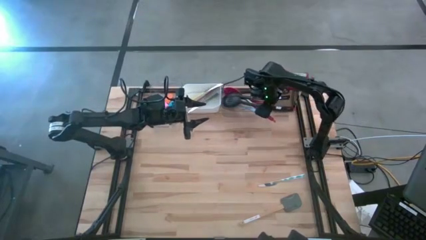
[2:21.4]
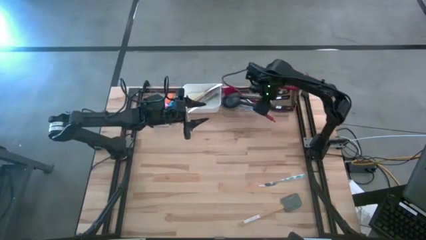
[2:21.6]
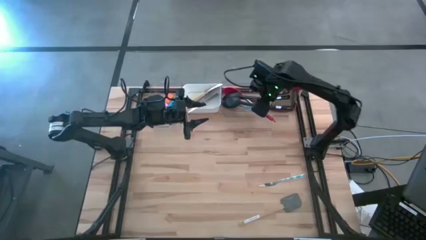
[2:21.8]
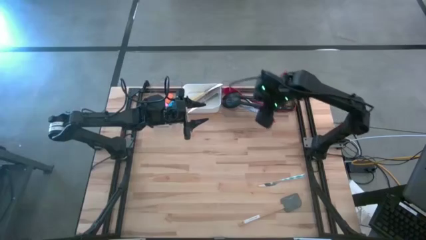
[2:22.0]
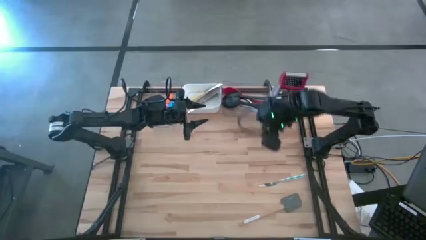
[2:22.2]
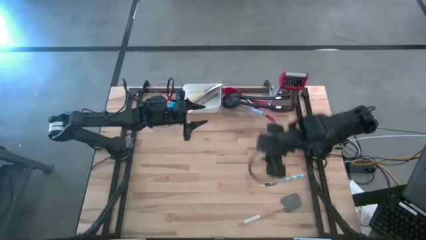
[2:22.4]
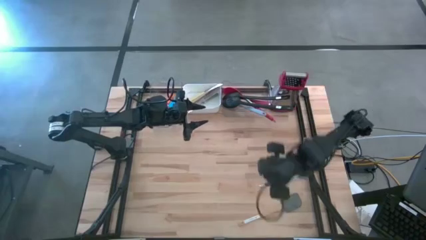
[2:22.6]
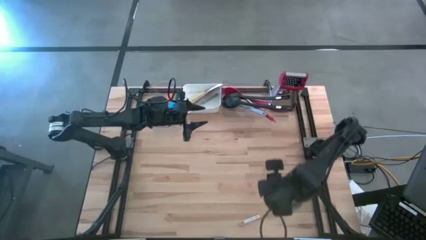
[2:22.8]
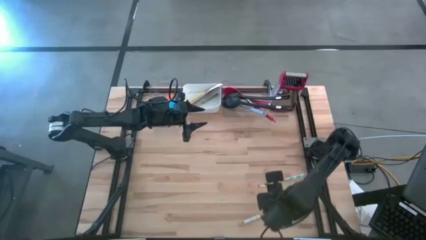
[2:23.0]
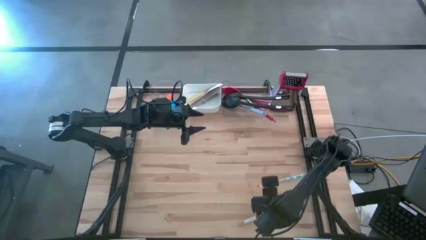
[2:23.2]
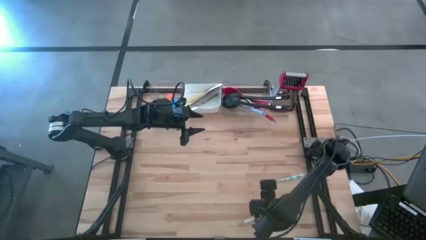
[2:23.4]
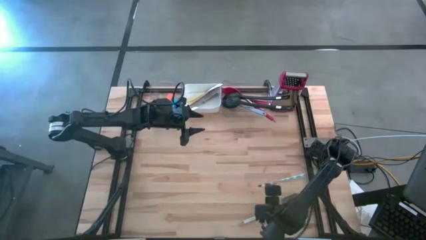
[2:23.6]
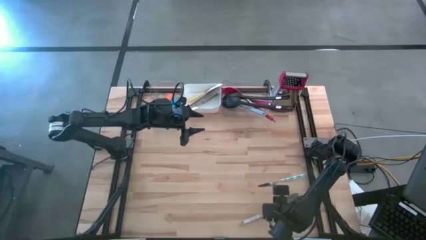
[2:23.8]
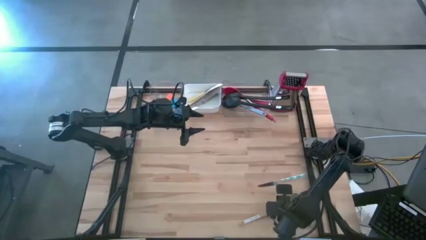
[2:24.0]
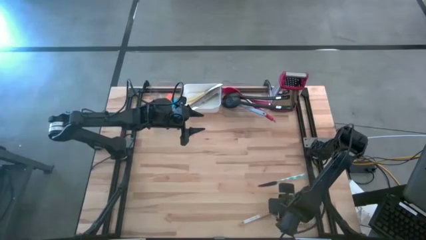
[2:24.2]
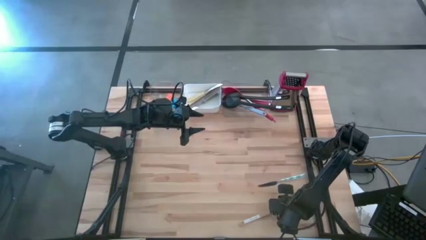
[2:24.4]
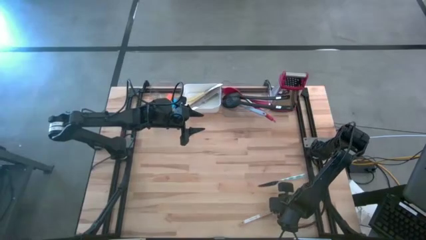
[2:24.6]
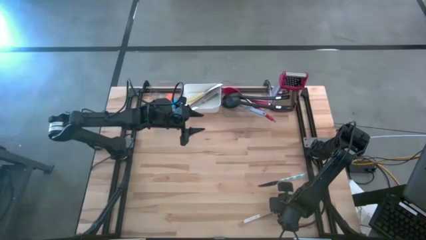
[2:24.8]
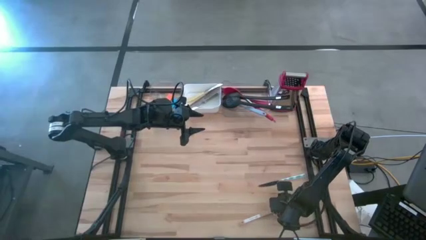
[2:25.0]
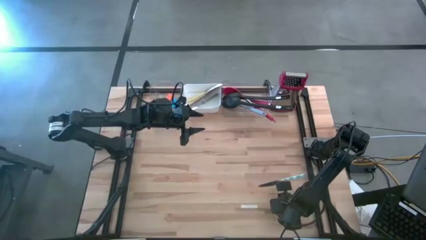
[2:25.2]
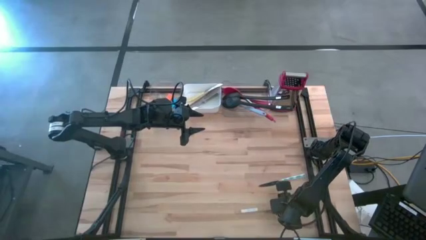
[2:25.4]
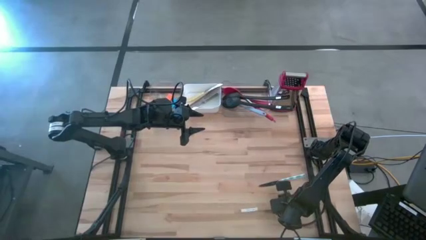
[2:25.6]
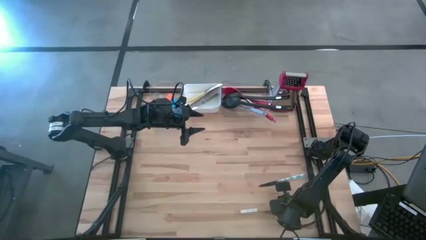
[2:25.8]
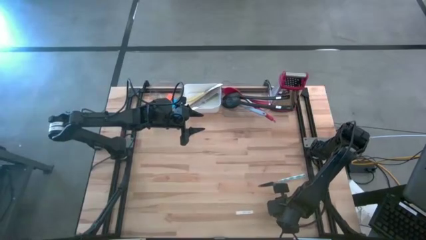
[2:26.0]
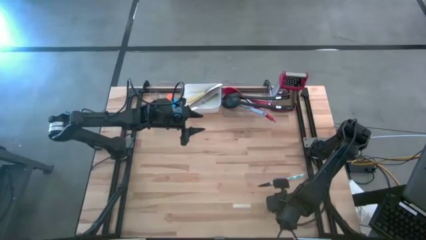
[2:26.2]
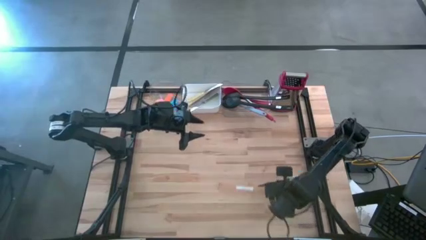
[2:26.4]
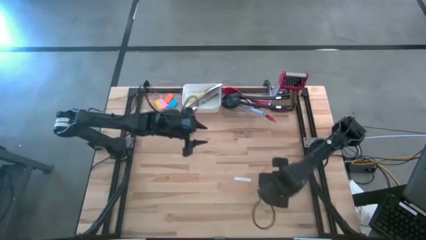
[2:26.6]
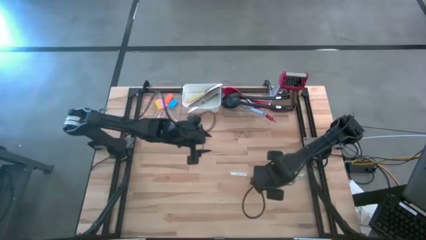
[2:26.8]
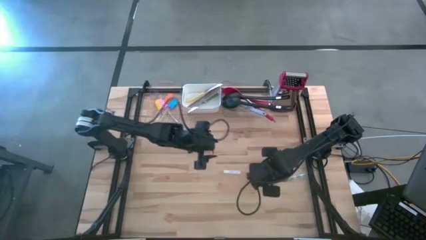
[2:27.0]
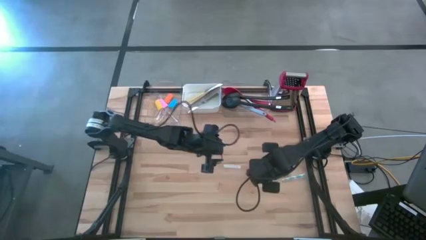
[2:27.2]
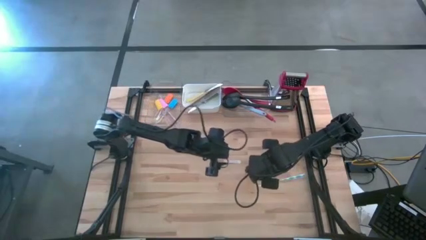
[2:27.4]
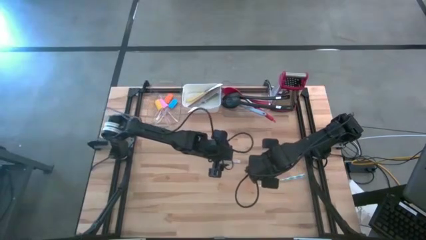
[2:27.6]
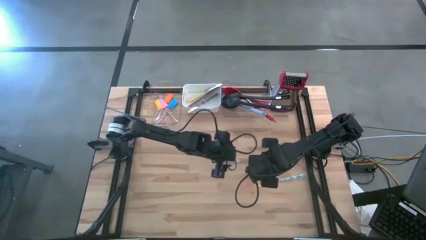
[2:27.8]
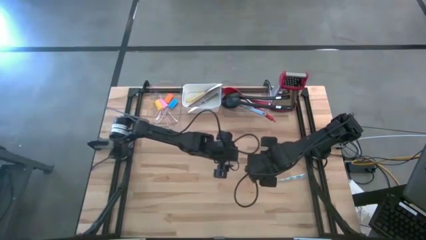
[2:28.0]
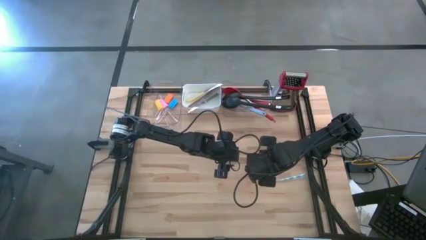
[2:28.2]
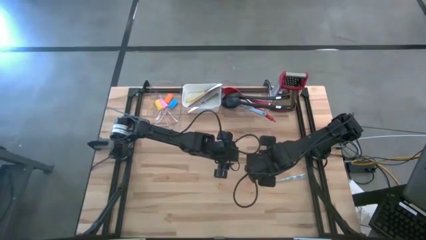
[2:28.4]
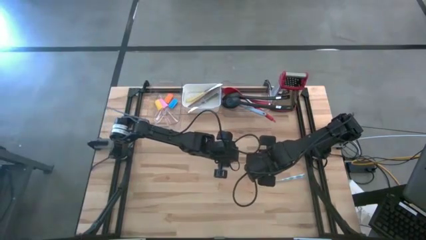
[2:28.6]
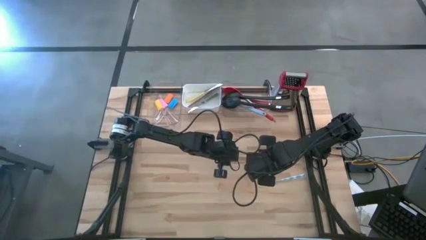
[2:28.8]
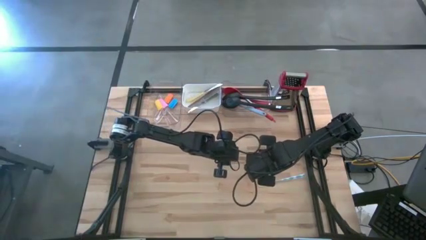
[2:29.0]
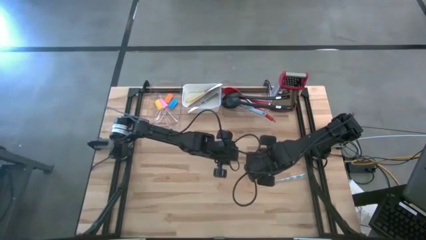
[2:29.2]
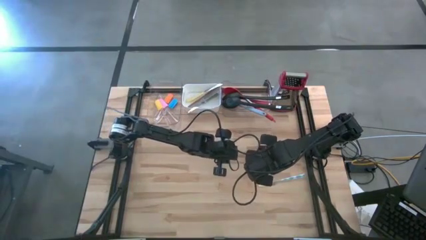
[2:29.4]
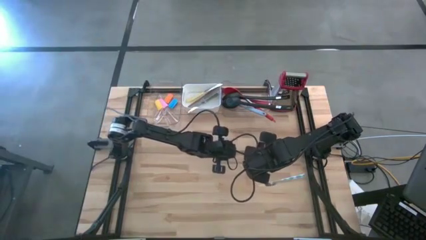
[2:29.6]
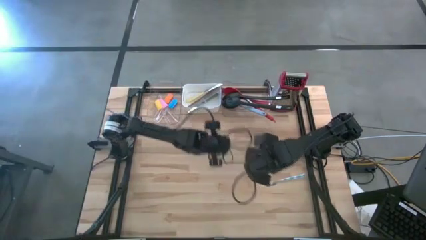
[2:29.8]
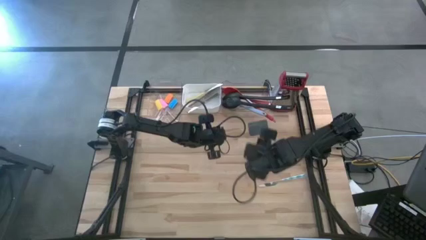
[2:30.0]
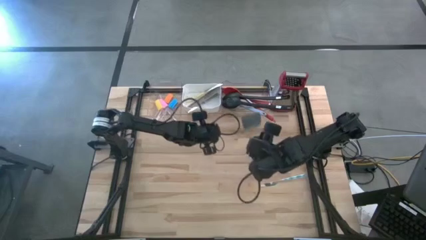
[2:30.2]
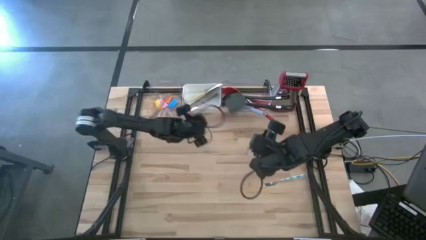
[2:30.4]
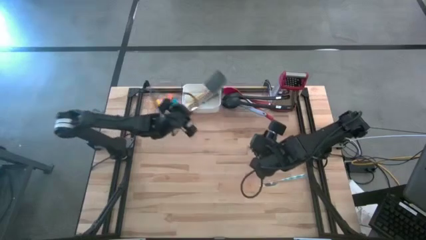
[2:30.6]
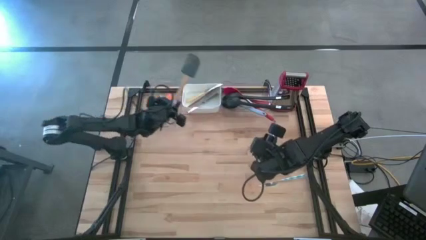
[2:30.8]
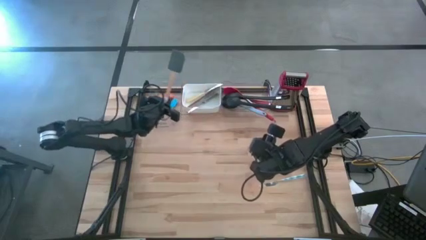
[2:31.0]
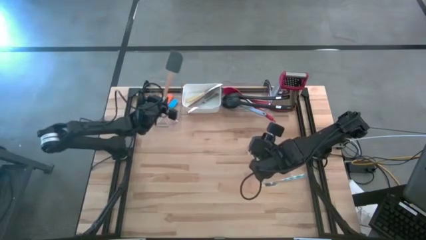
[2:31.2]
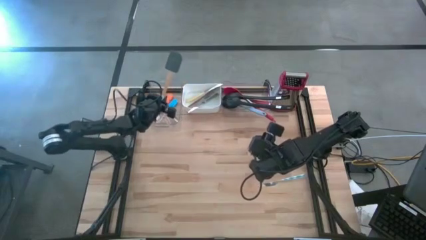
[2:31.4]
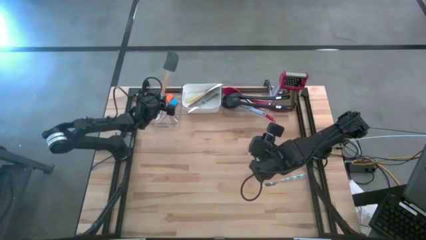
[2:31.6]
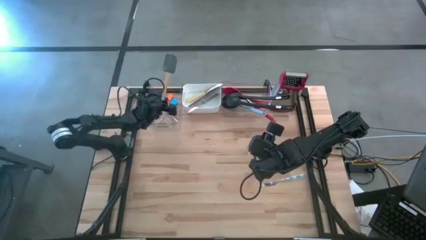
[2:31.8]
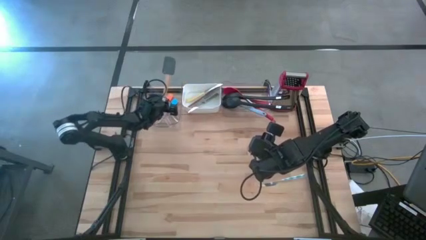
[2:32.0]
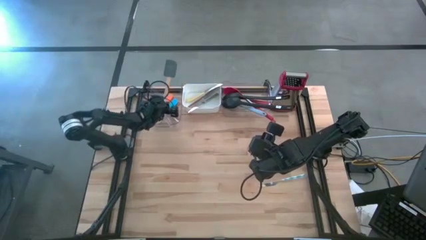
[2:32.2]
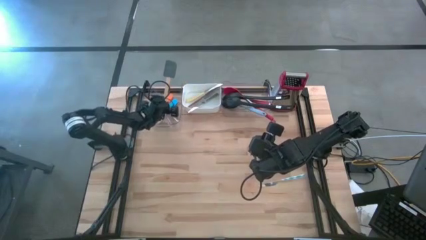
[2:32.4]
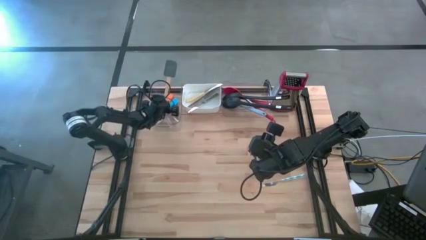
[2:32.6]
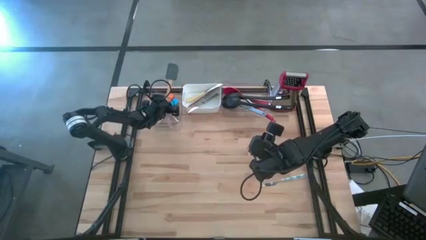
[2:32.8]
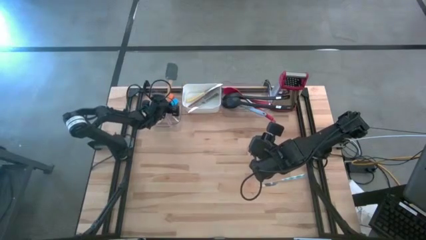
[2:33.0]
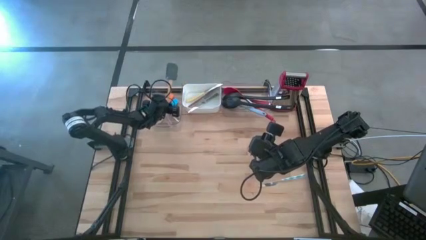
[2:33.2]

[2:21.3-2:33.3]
Task: Pick & Place Kitchen Items
Put the gray spatula into the left transparent bin
